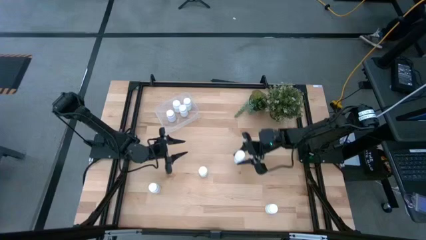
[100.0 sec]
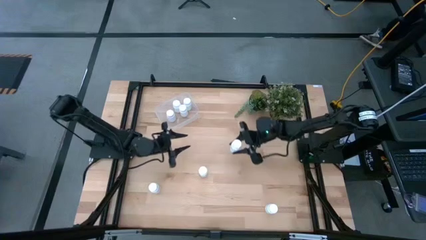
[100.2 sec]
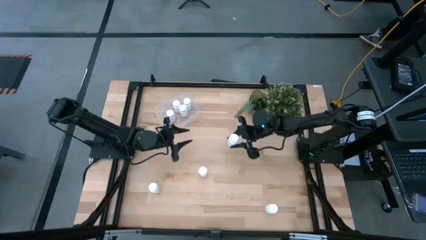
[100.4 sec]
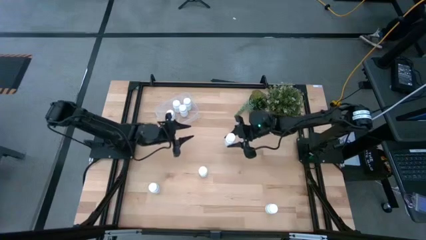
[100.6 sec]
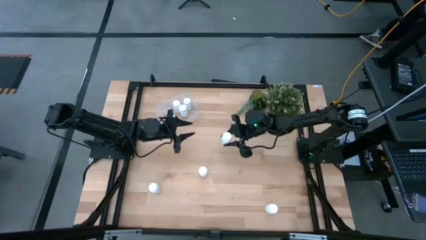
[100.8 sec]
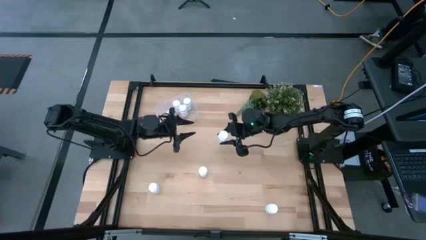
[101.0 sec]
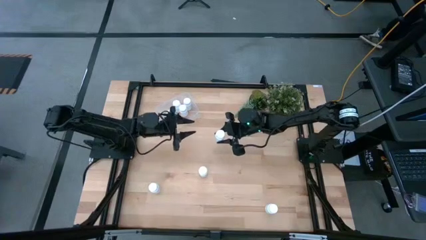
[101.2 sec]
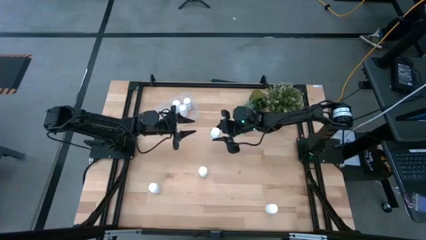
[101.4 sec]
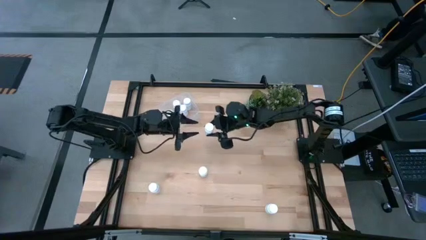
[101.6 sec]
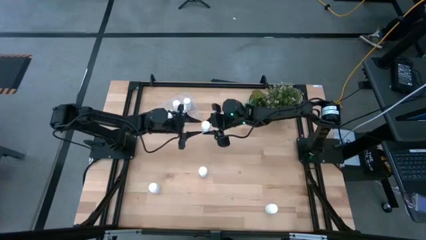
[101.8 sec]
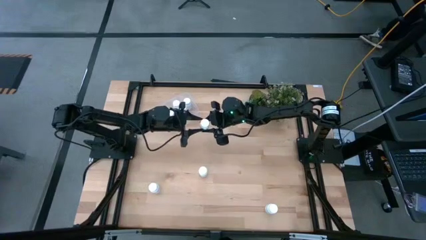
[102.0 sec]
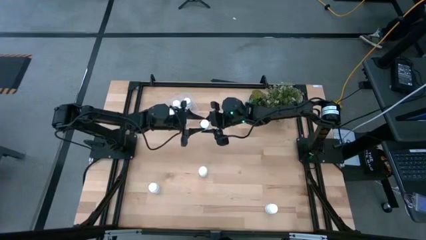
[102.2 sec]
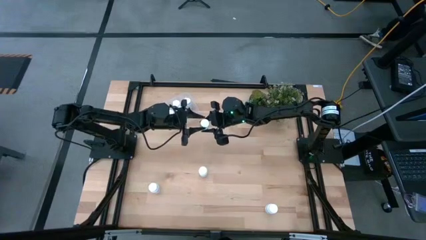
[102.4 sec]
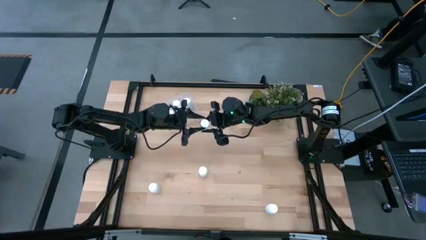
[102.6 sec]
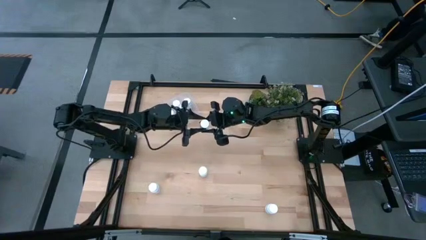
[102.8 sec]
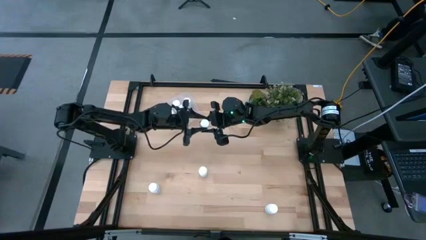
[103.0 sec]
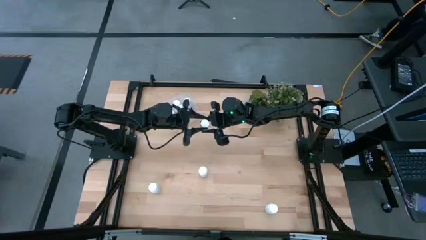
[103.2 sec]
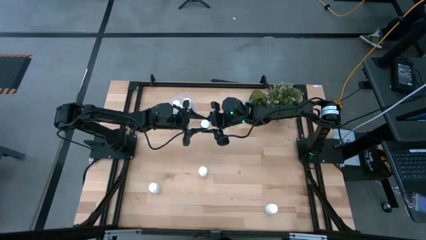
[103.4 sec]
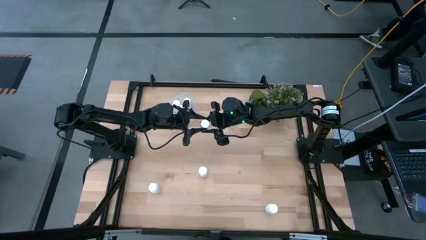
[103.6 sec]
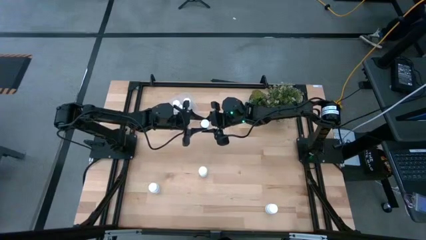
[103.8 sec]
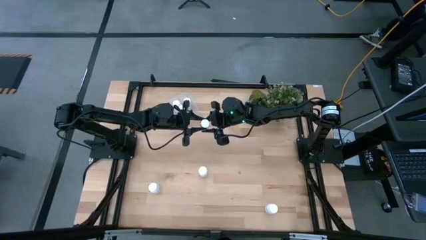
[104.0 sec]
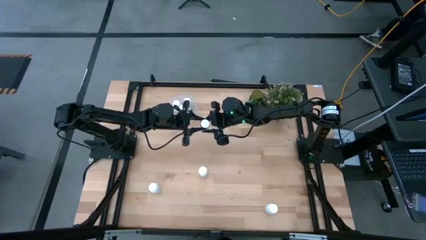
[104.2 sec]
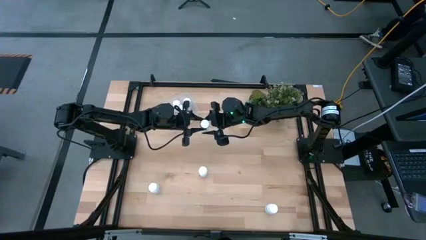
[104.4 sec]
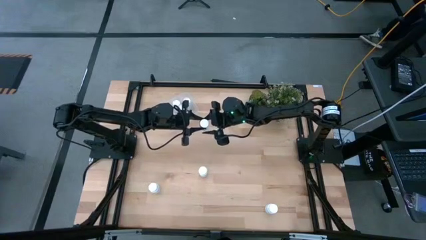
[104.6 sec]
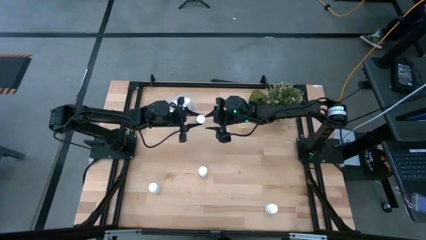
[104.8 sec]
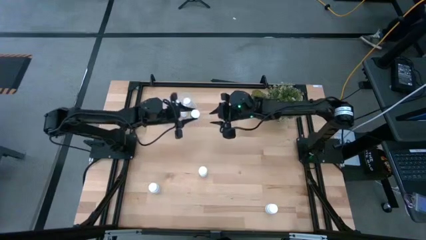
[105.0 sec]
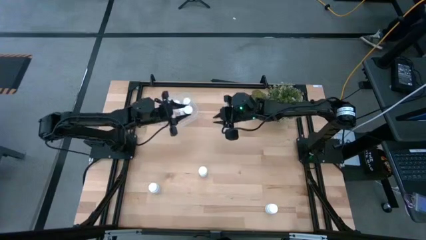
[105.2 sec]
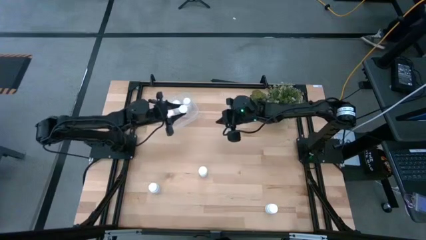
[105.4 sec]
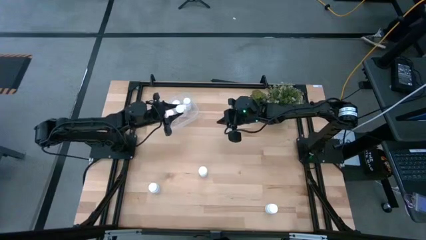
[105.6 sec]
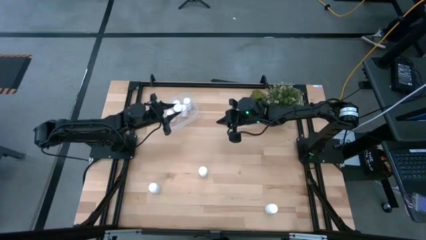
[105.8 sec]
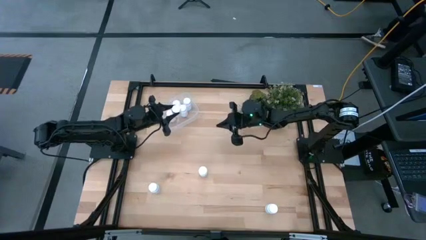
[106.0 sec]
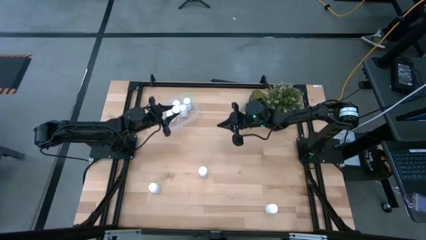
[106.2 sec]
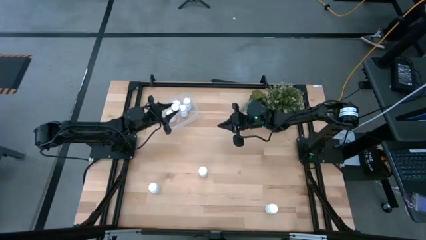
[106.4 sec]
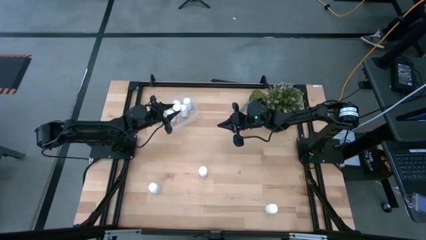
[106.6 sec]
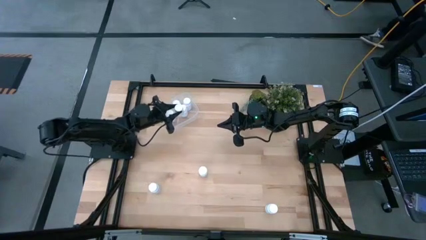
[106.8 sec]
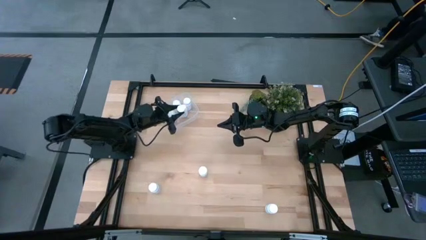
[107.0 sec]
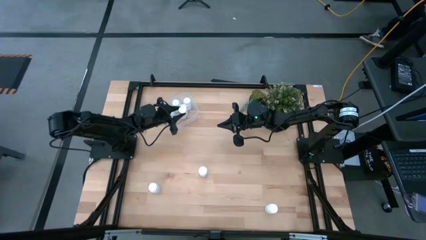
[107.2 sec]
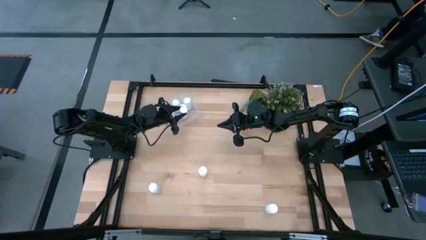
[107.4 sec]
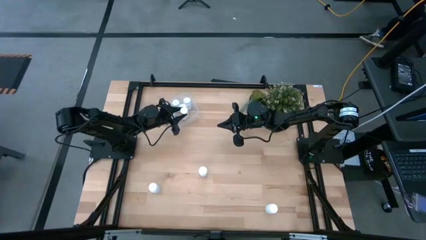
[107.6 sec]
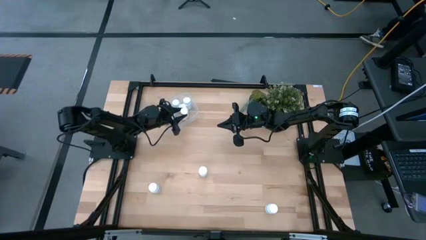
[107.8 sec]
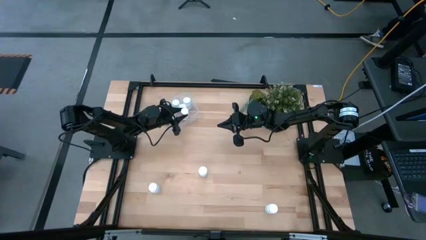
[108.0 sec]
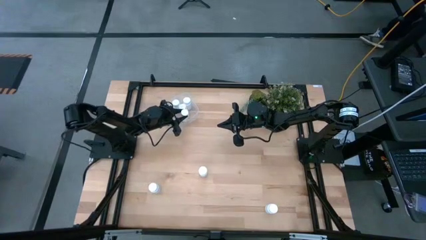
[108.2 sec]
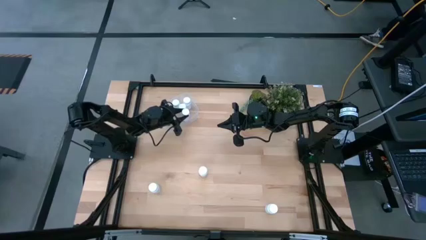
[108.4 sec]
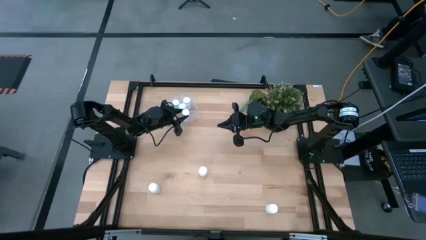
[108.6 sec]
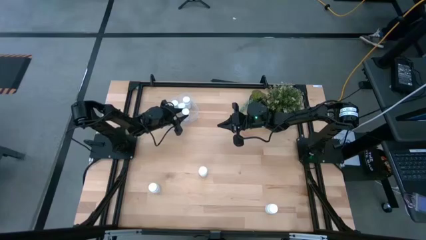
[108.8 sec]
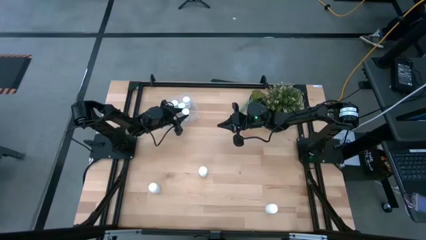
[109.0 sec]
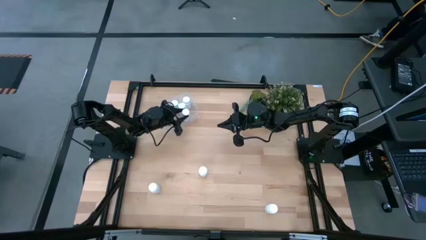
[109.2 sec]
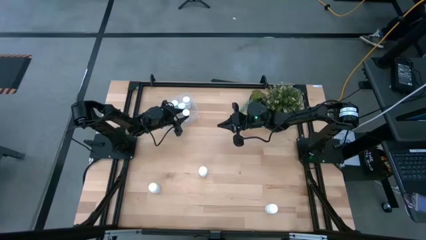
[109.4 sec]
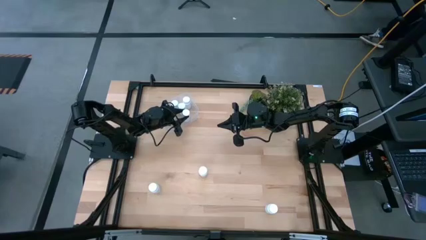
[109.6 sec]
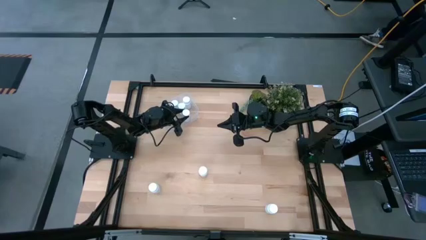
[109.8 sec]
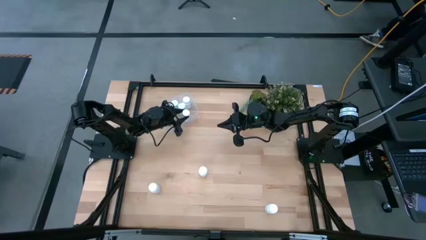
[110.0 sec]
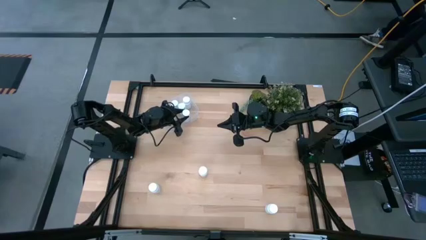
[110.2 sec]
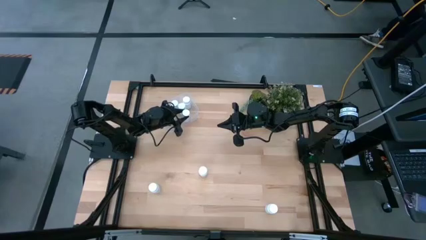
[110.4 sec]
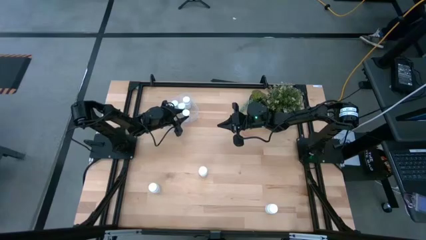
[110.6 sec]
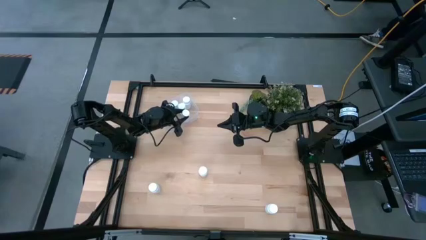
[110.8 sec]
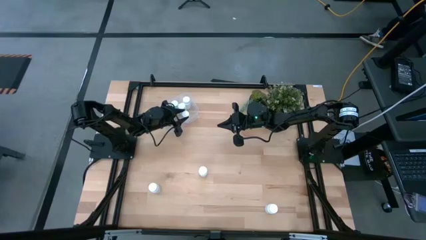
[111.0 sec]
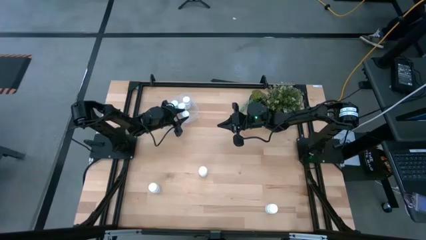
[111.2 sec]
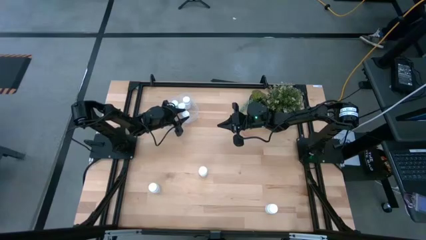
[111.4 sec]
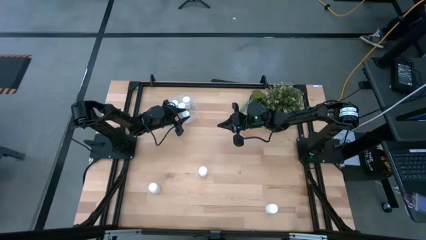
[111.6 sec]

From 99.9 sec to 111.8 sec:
Task: Pick and place pill bottles into a basket
Put the white medicine bottle into the transparent bin
